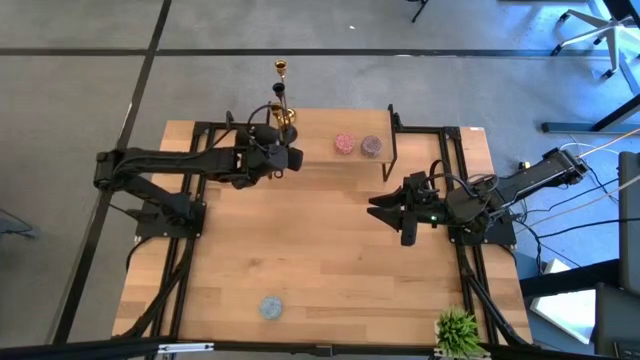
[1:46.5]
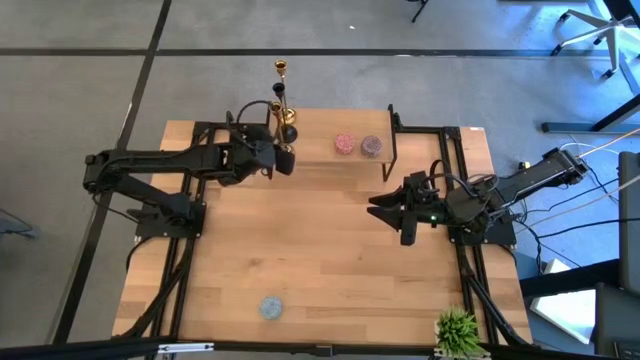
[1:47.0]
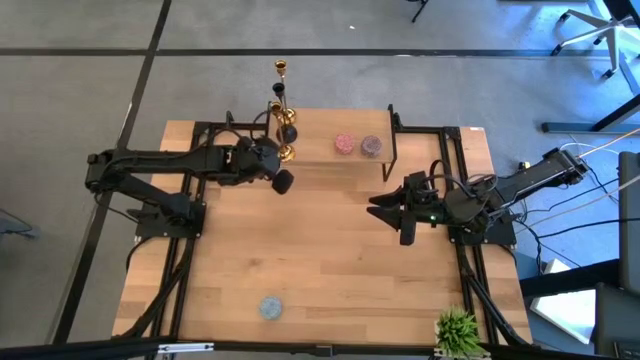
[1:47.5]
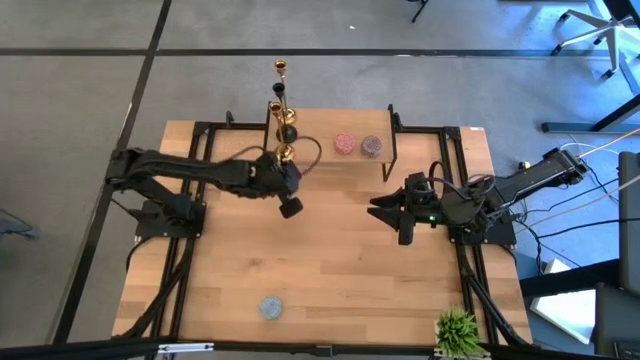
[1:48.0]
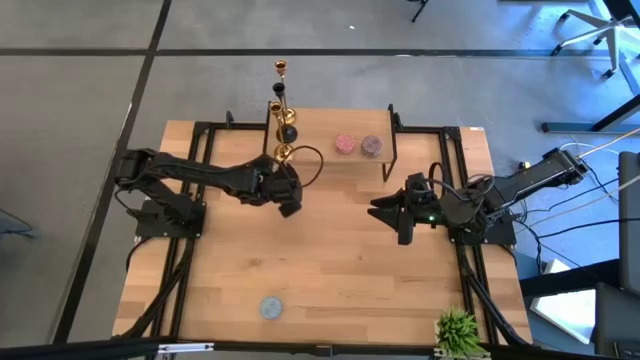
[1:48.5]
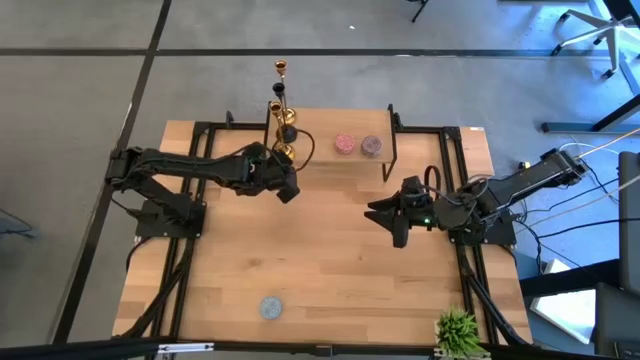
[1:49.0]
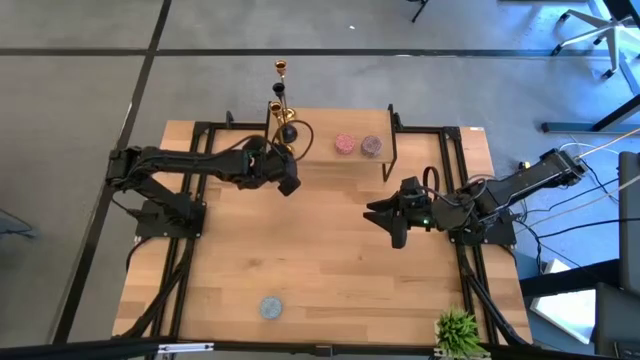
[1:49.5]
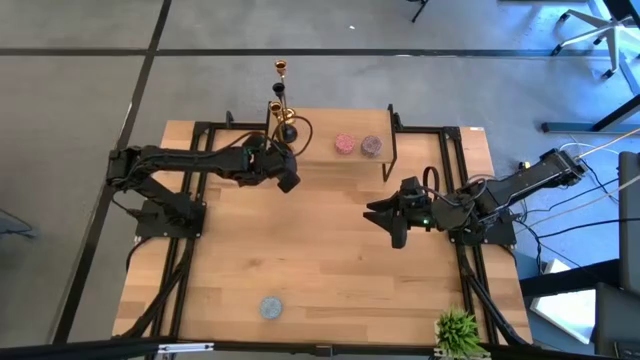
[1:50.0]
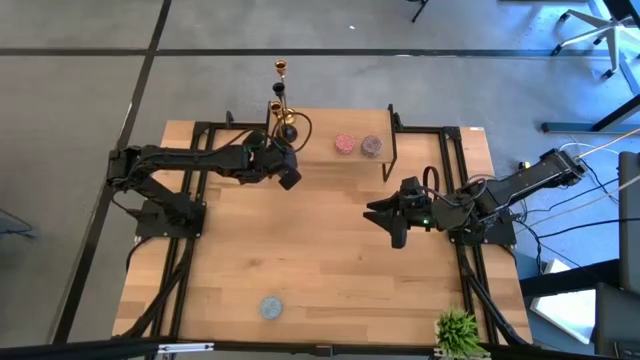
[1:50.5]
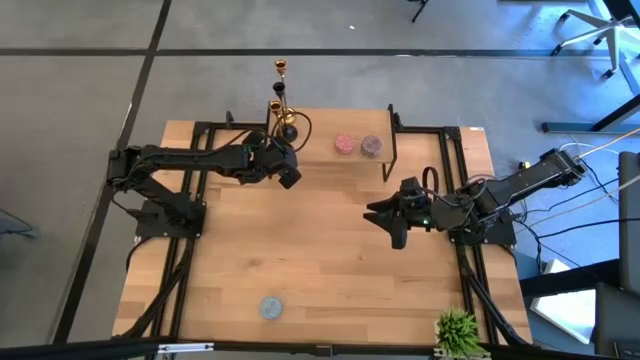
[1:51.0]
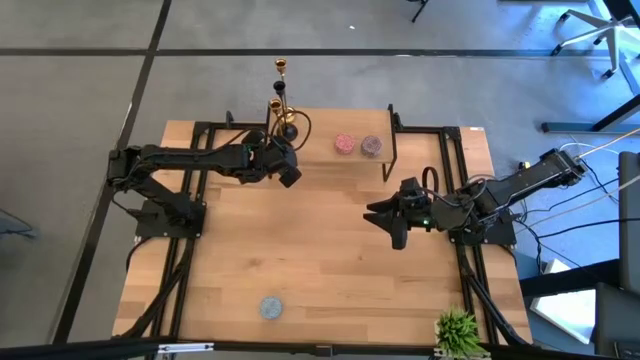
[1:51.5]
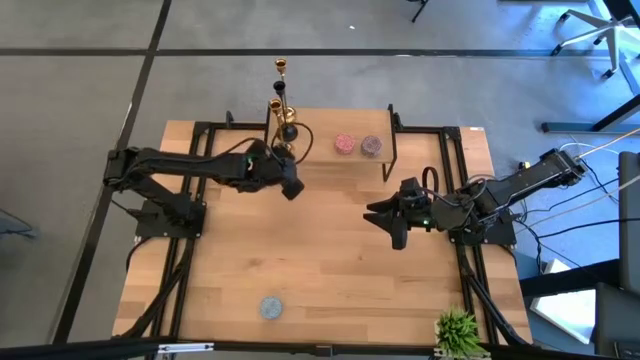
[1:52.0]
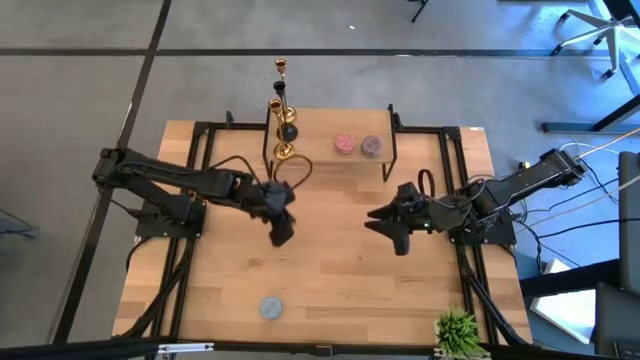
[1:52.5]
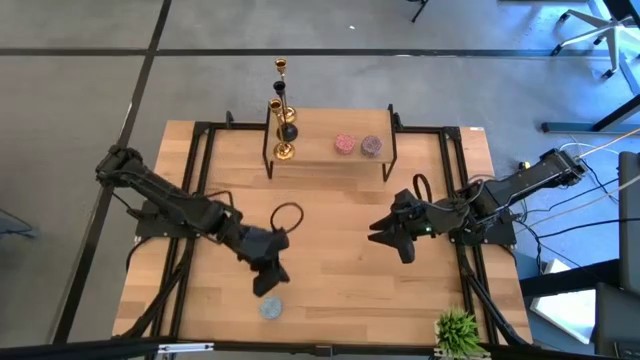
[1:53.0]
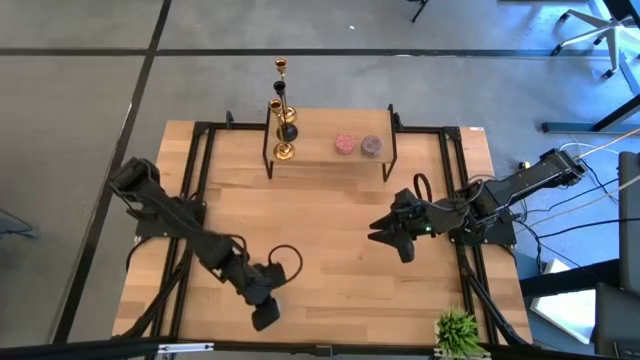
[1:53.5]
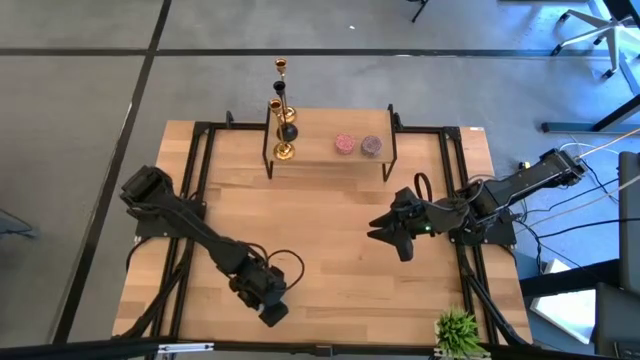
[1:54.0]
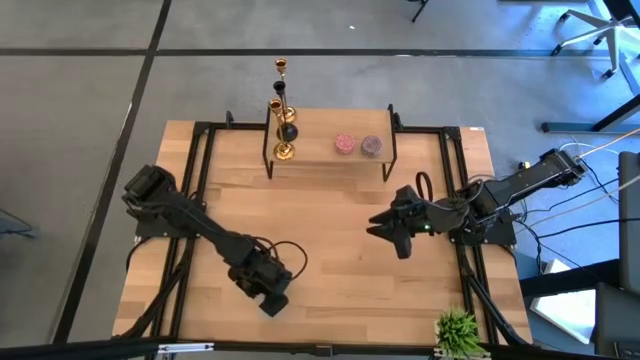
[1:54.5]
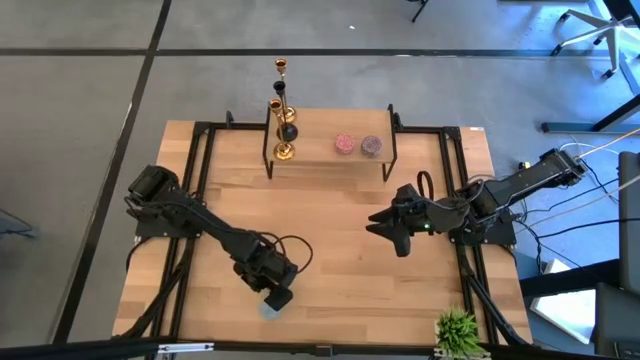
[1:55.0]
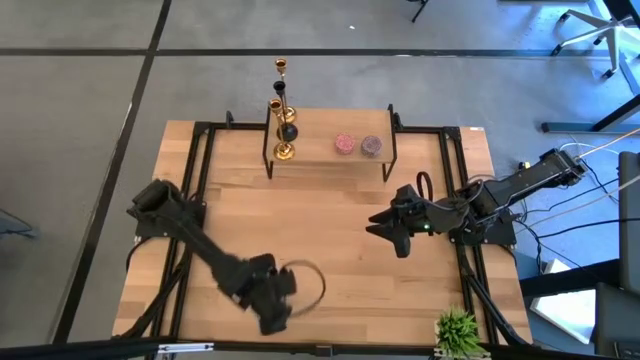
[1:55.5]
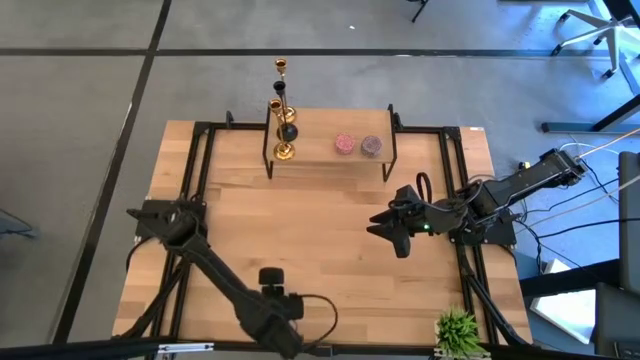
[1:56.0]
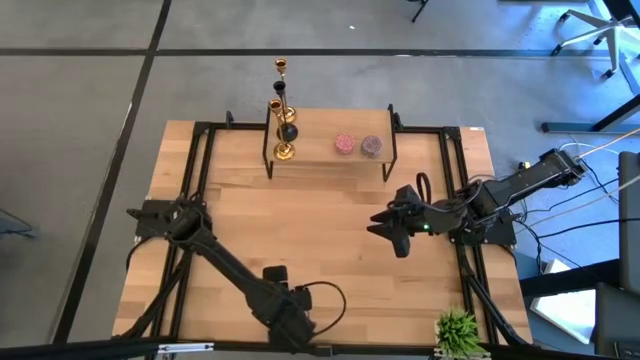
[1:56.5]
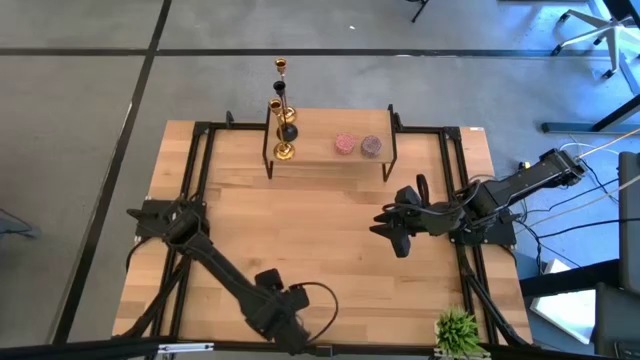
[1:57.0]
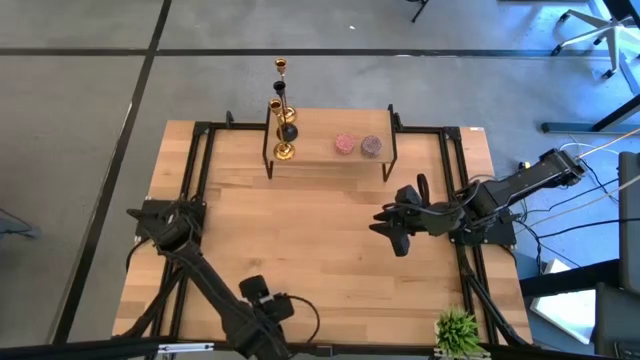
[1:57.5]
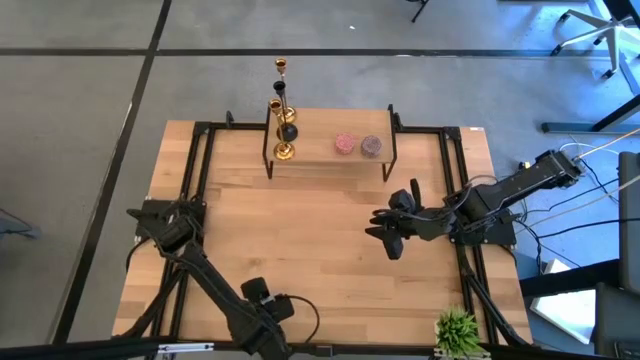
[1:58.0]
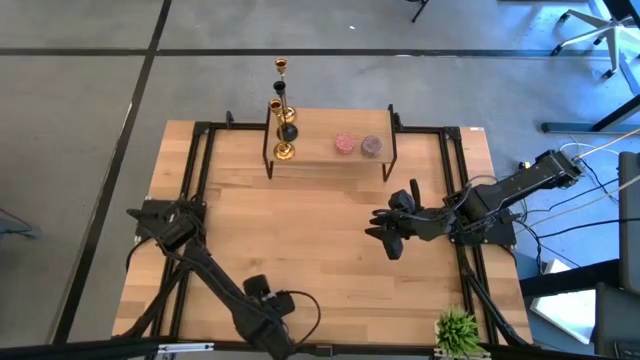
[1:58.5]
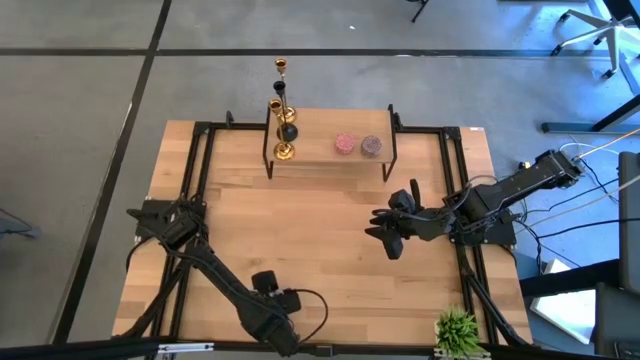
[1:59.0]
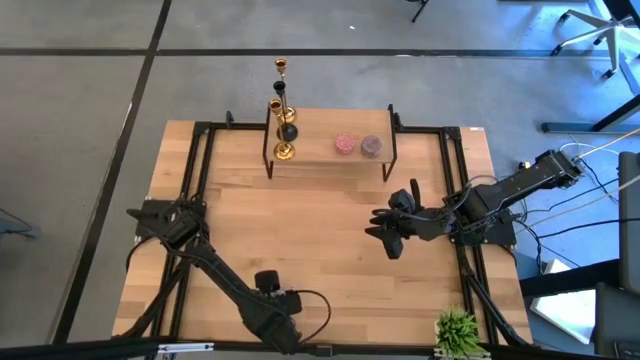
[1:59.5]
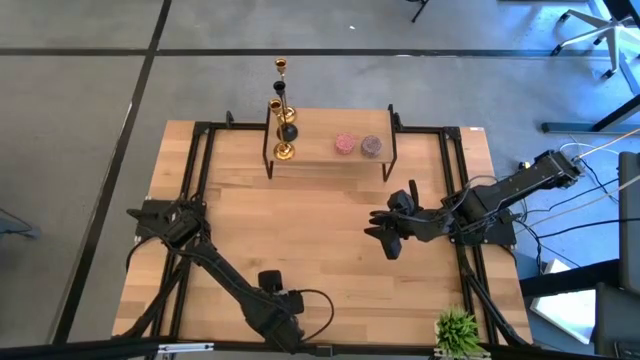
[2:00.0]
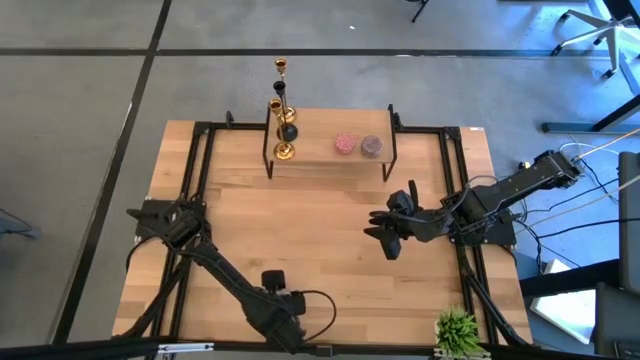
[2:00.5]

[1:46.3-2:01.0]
Task: Pick & Place candle stick holders
Put the blue candle on the shelf

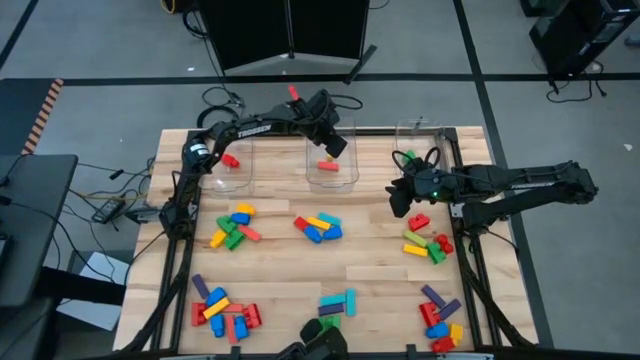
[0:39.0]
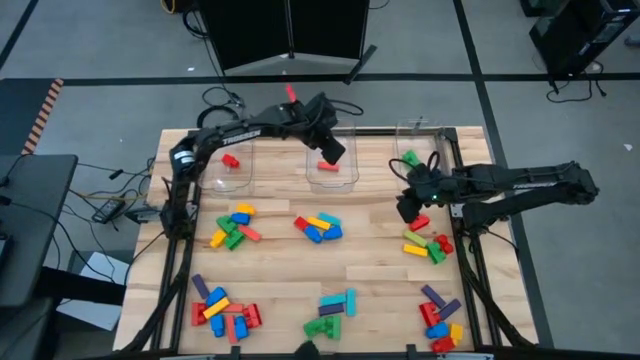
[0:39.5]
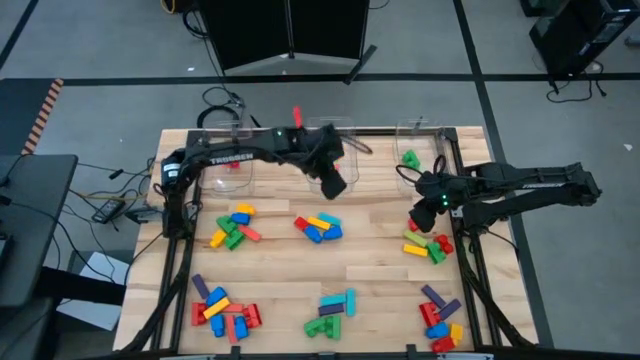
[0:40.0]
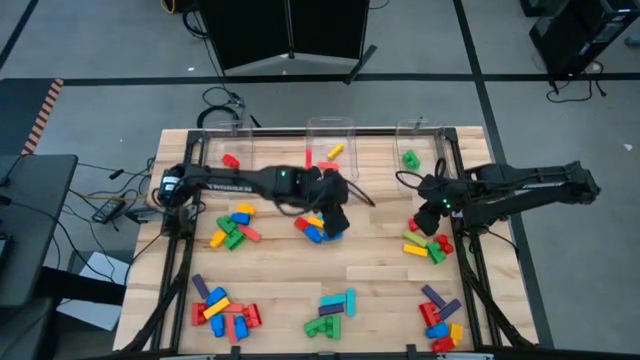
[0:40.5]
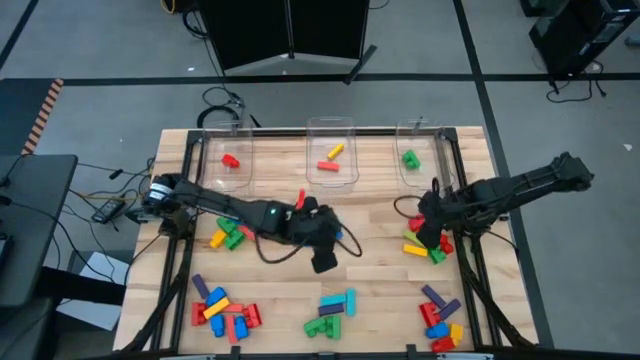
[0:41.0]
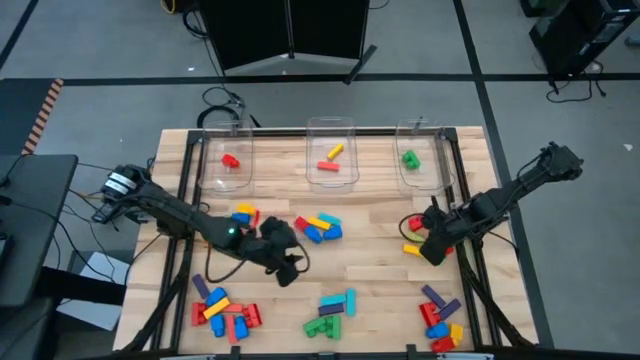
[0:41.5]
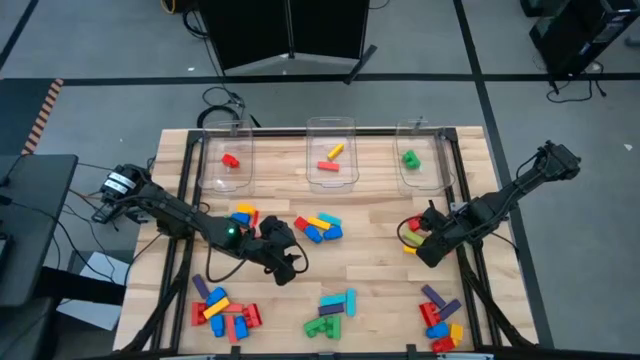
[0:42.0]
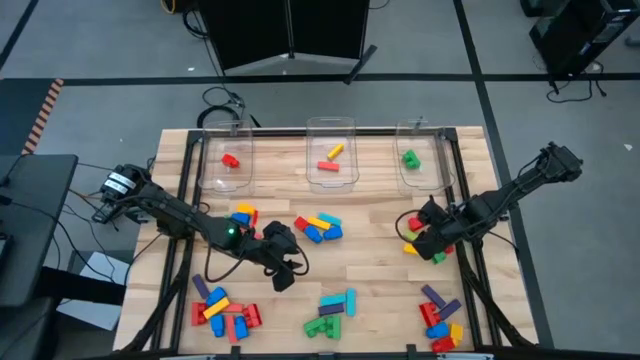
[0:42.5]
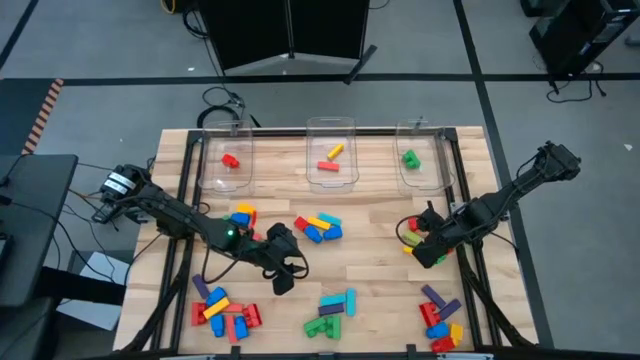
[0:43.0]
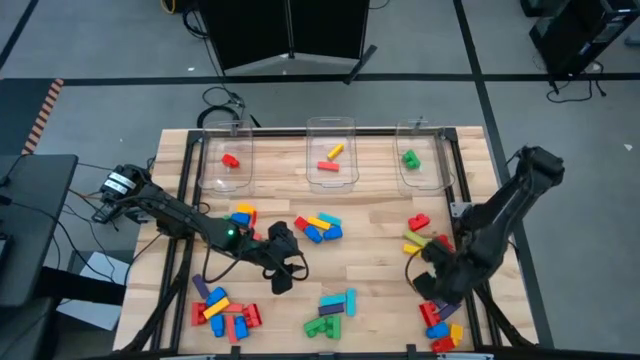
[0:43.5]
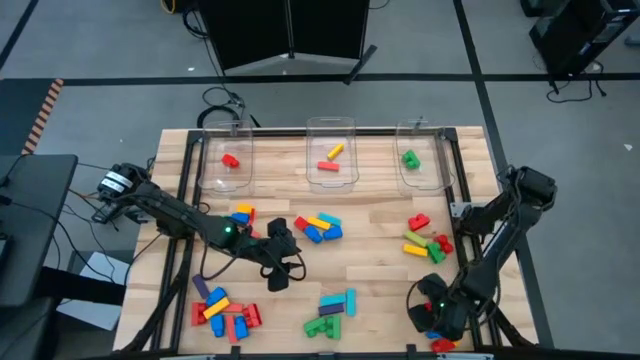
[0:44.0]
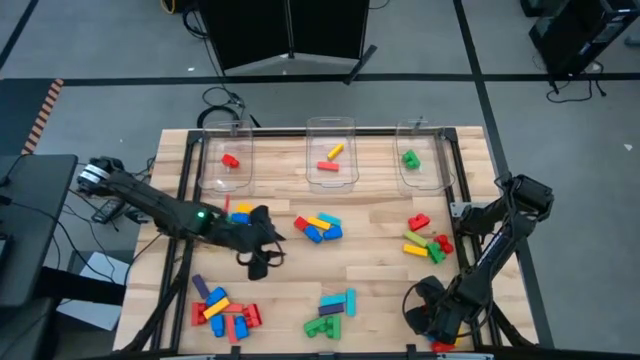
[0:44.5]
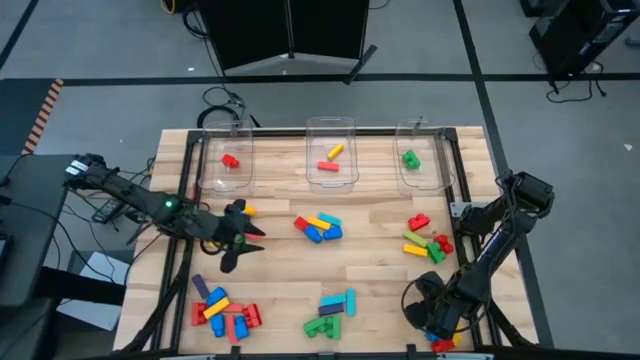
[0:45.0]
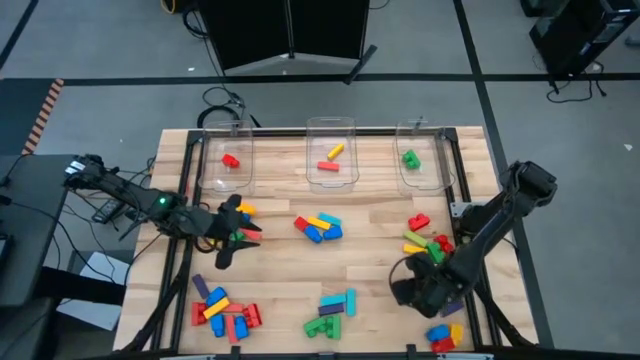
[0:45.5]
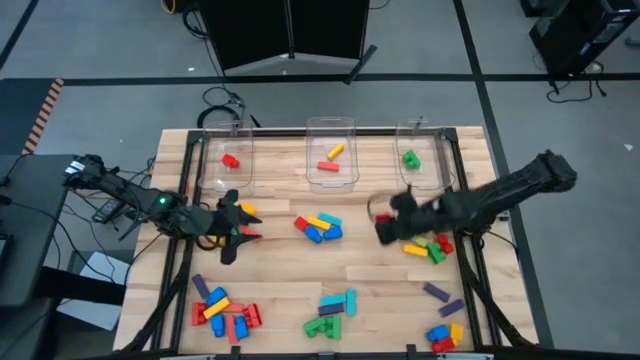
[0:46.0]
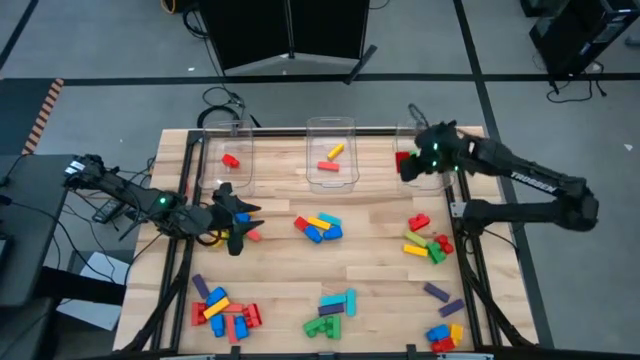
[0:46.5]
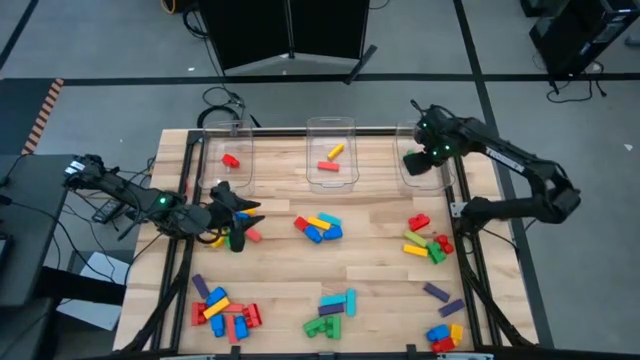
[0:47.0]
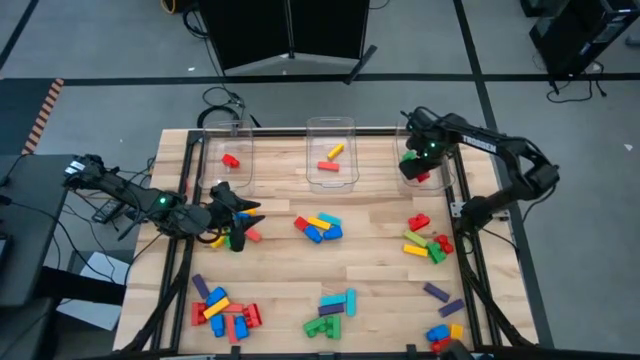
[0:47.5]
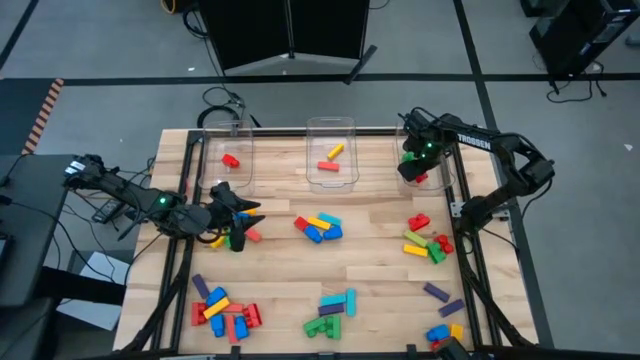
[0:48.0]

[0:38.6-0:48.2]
Task: Sort blocks by size
Put the red 2 stud game piece into the right transparent bin
